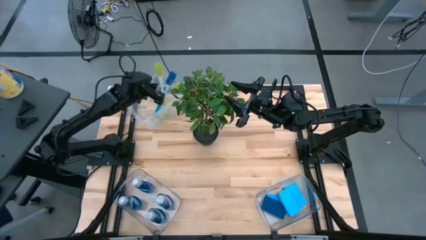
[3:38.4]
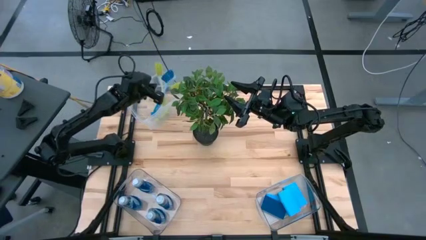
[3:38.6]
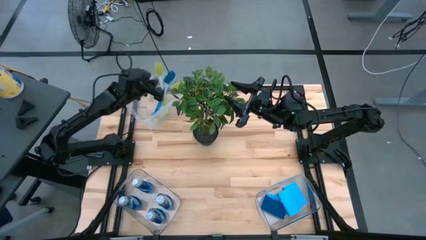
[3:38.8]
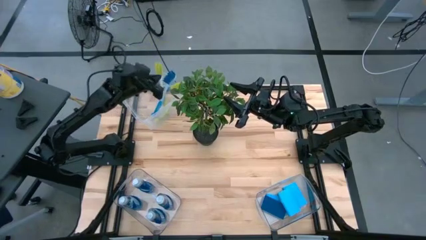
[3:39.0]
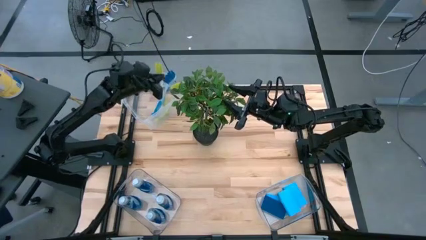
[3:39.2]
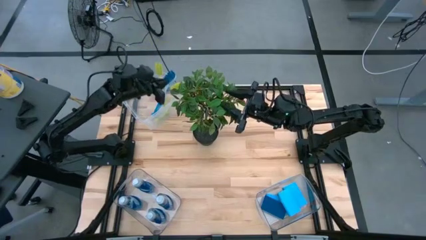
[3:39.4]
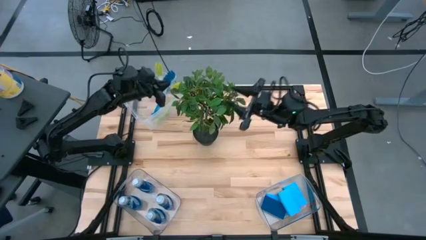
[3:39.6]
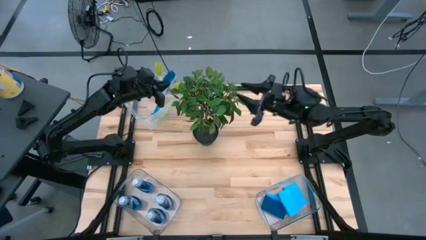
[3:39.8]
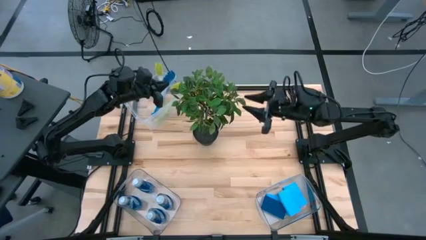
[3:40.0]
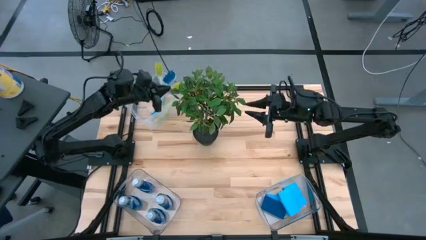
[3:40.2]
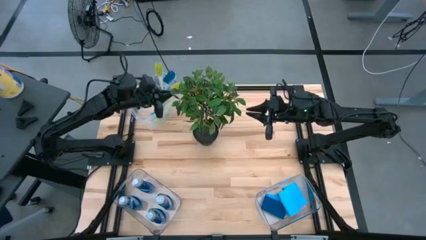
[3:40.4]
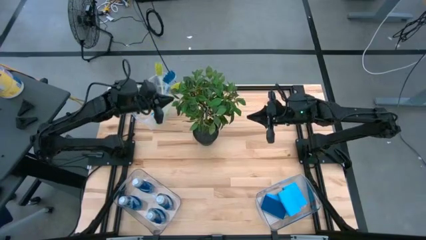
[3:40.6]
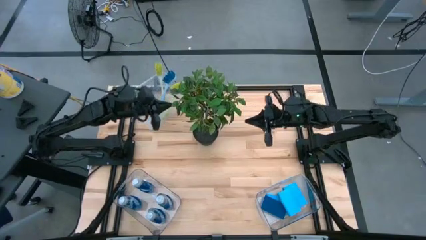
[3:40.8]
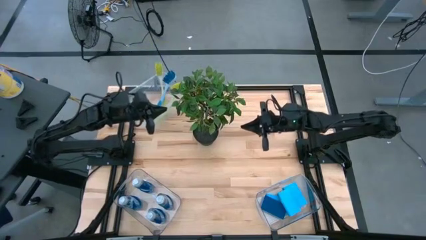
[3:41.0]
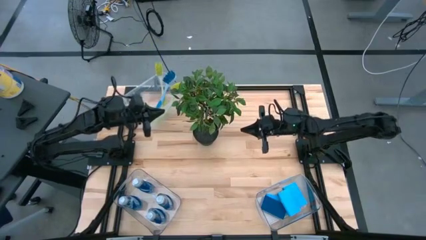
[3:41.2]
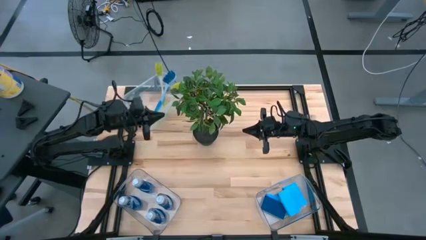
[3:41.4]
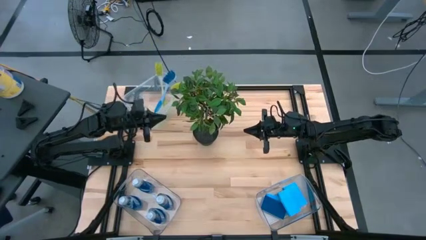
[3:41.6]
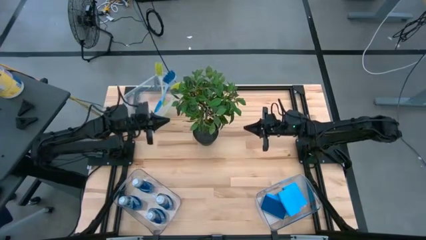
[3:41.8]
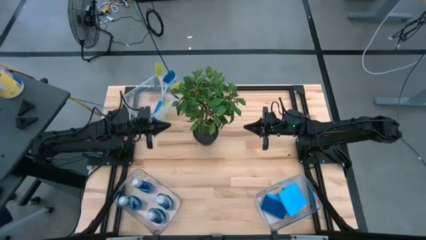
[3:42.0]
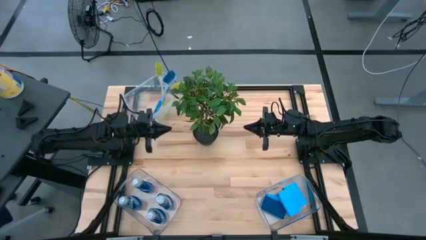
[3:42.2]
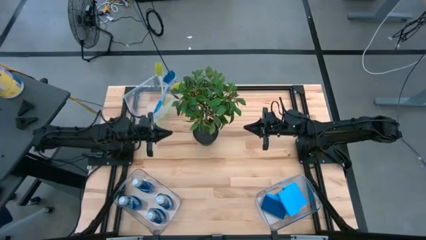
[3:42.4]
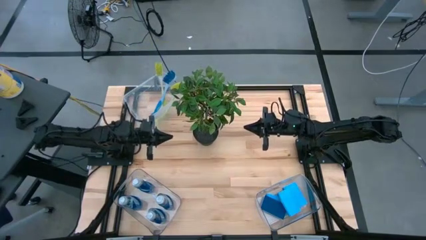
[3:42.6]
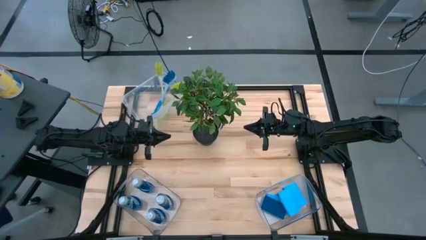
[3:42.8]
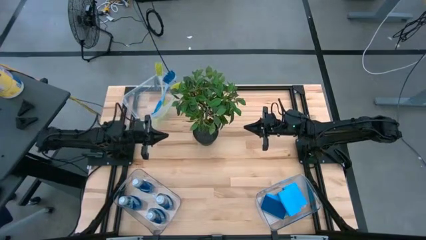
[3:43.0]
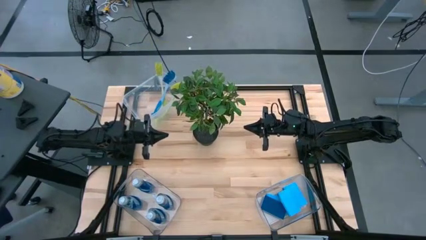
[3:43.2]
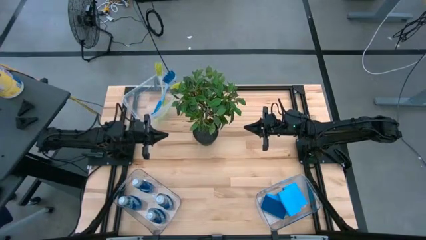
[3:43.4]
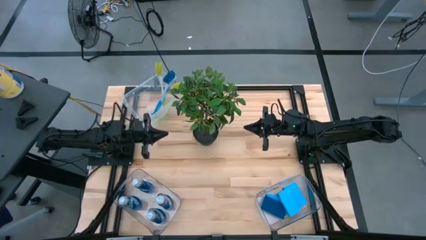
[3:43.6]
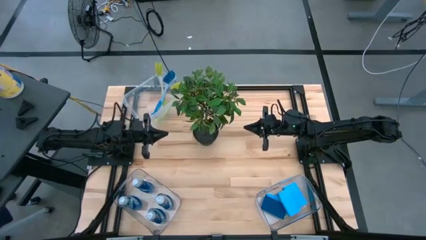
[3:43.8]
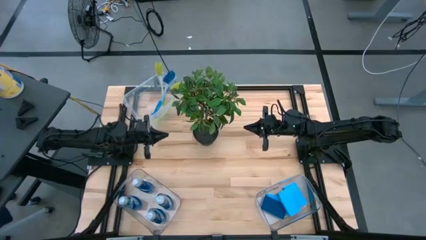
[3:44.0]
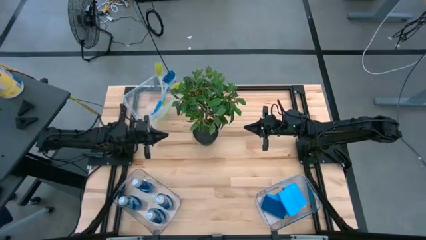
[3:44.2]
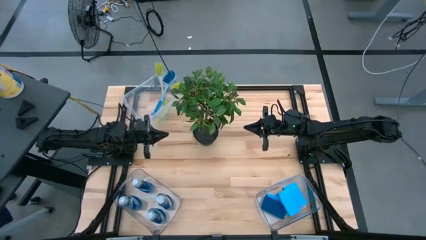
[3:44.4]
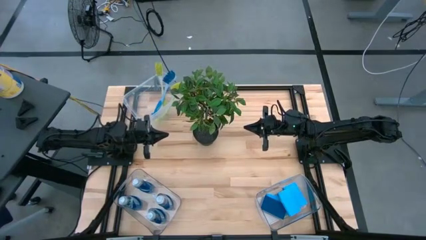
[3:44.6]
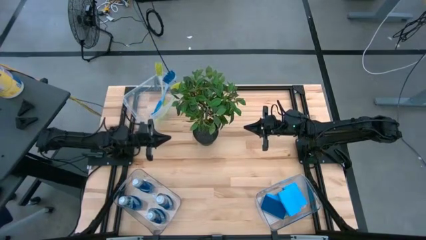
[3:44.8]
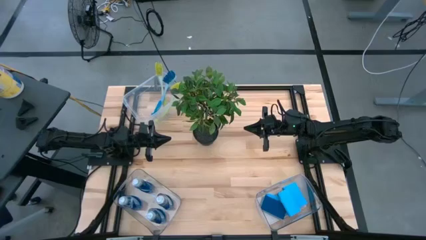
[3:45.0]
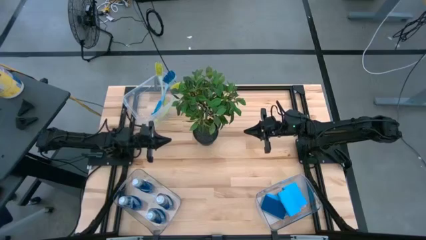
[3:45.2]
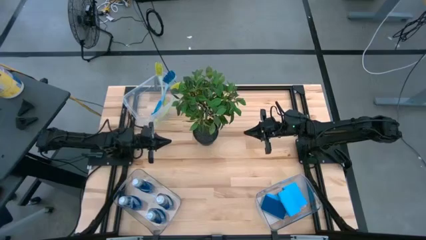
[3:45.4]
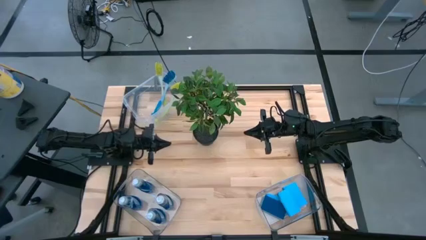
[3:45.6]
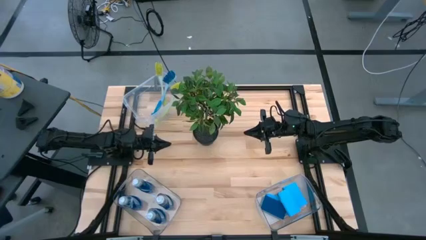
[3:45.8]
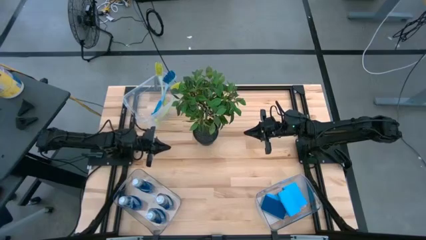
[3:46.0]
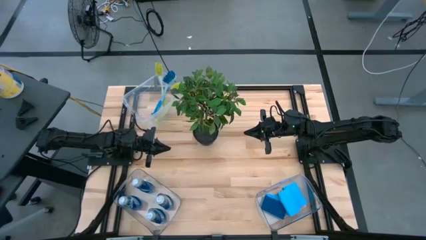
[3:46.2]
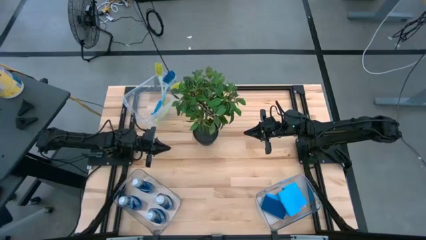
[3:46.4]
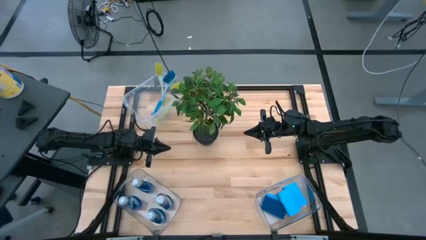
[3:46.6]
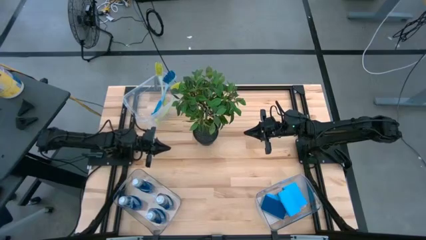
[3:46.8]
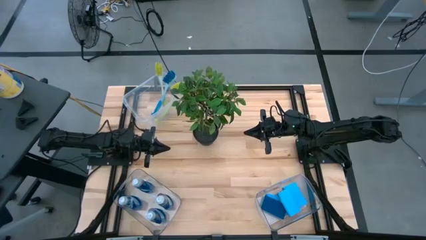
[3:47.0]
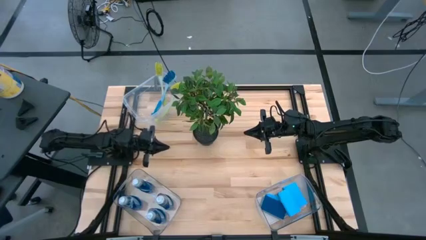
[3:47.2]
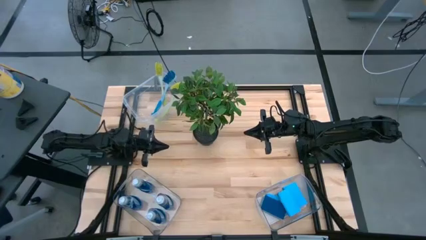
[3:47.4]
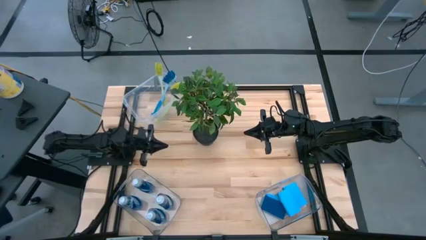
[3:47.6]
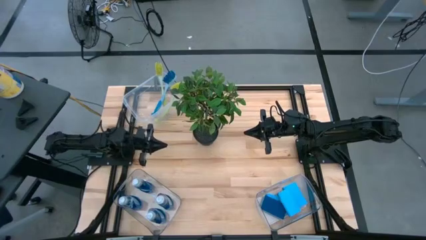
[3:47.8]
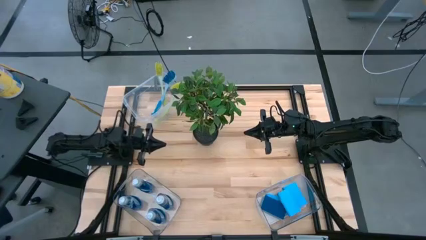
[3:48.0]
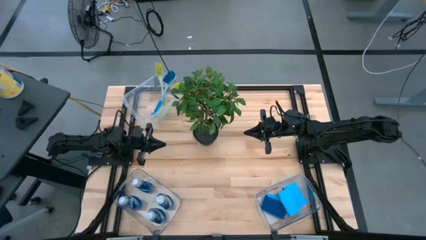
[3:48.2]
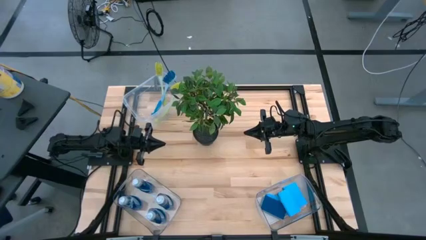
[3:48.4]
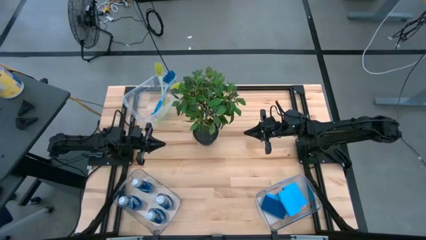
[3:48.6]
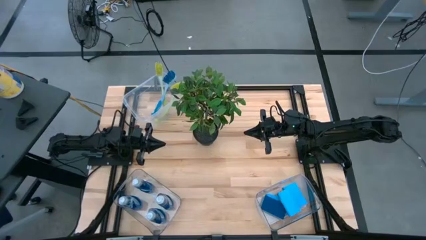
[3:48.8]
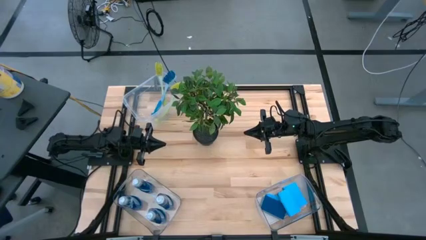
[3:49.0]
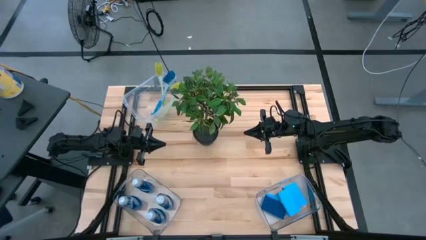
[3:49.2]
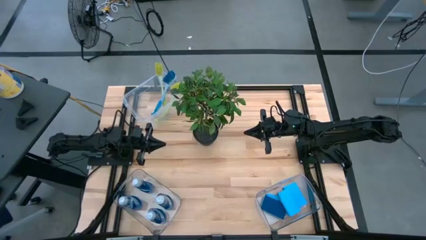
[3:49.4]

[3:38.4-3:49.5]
Task: Pick & Place Kitchen Sink Supplies
Return to Home Position

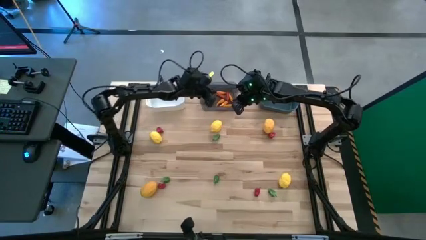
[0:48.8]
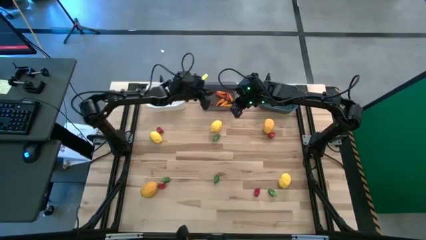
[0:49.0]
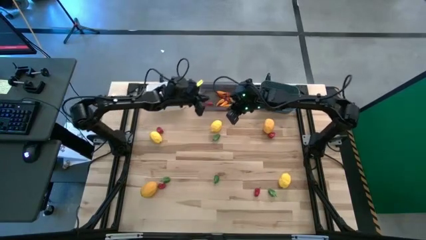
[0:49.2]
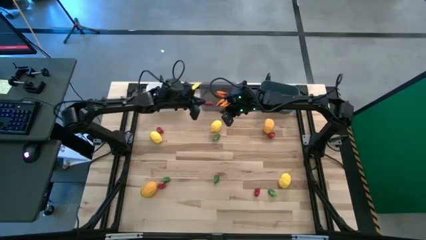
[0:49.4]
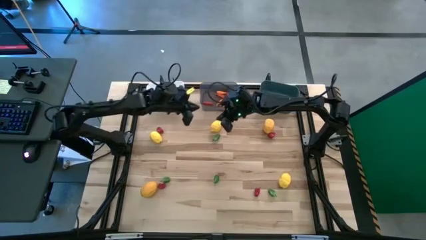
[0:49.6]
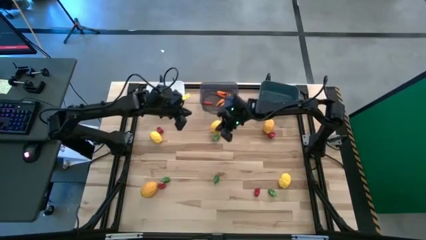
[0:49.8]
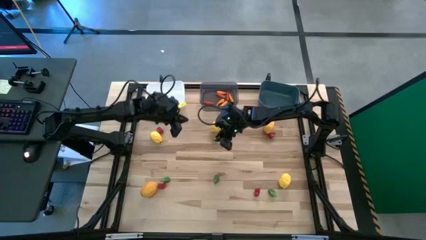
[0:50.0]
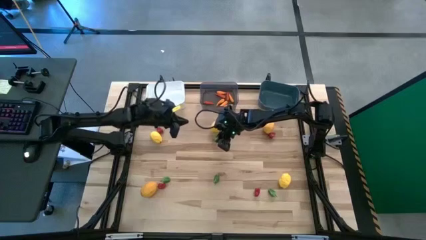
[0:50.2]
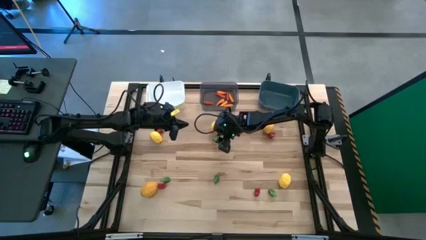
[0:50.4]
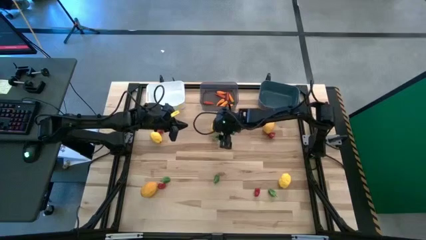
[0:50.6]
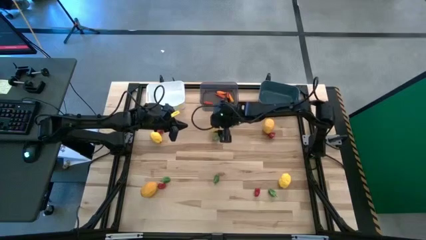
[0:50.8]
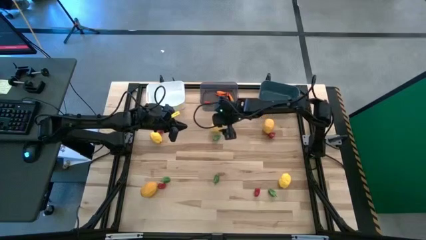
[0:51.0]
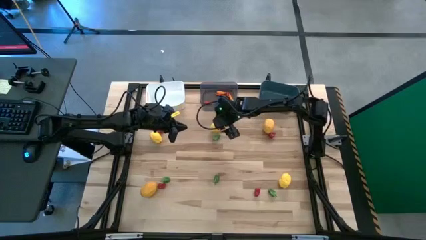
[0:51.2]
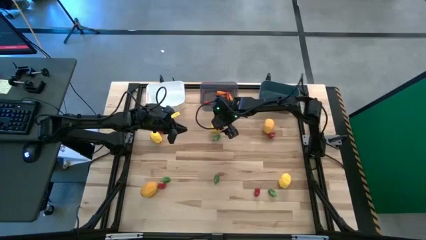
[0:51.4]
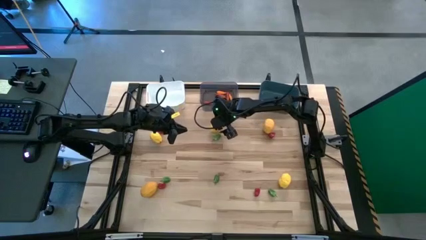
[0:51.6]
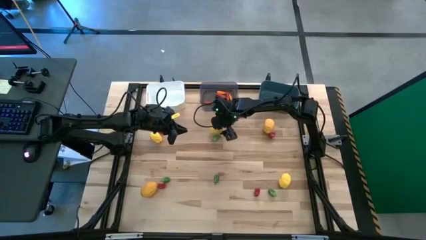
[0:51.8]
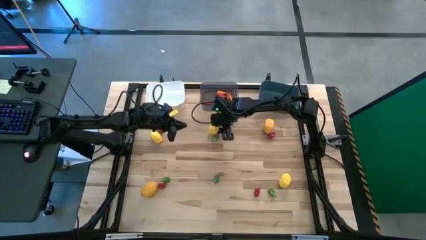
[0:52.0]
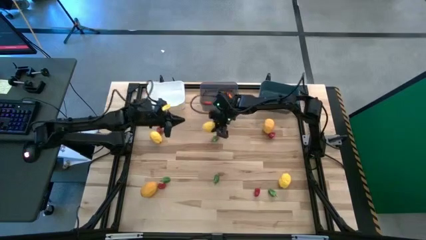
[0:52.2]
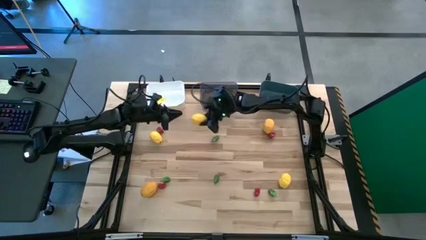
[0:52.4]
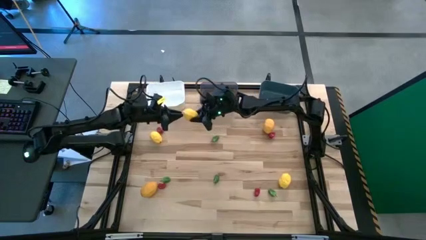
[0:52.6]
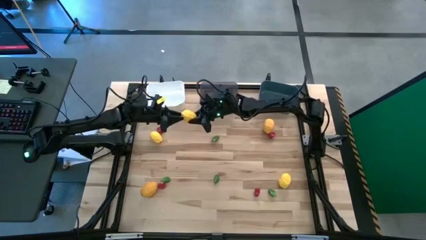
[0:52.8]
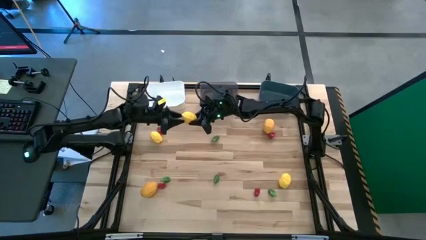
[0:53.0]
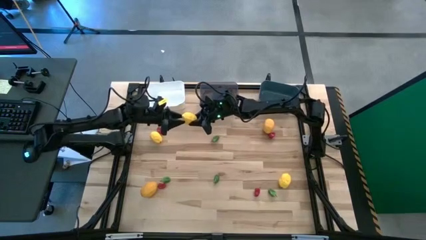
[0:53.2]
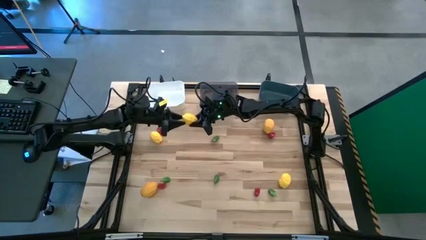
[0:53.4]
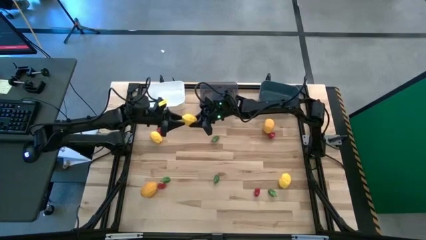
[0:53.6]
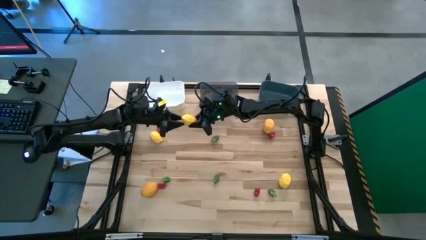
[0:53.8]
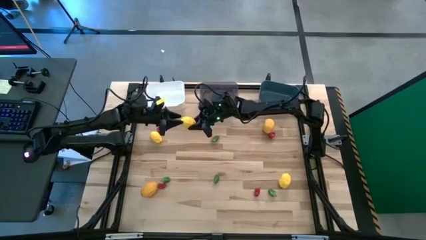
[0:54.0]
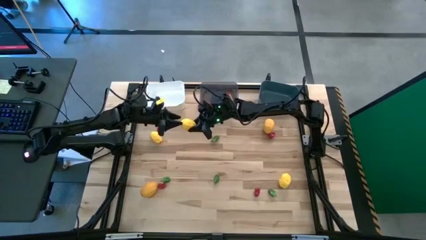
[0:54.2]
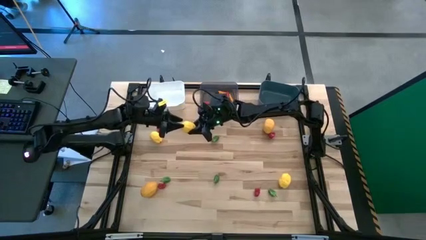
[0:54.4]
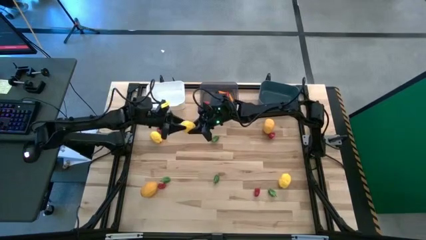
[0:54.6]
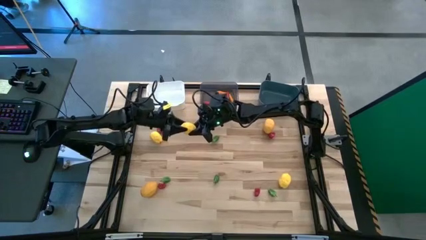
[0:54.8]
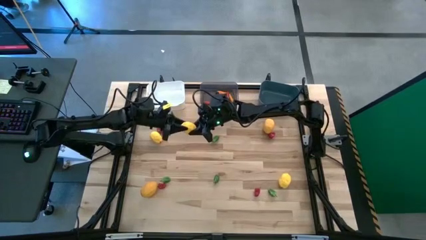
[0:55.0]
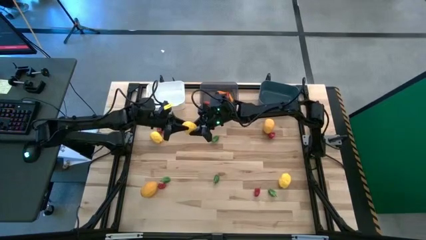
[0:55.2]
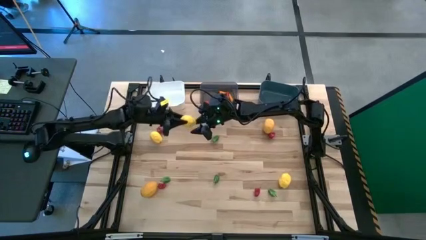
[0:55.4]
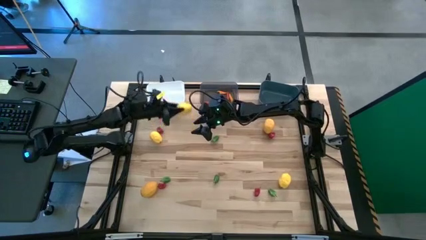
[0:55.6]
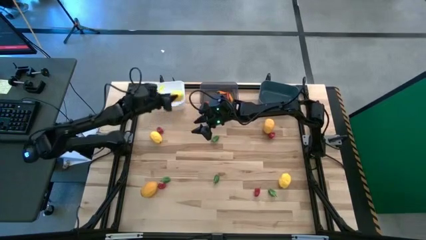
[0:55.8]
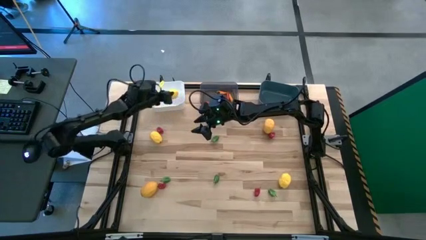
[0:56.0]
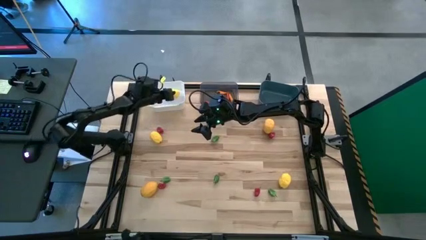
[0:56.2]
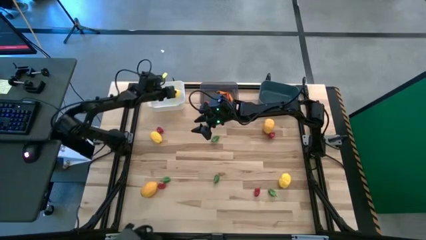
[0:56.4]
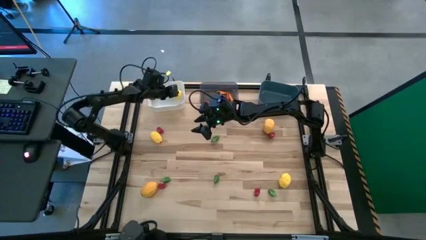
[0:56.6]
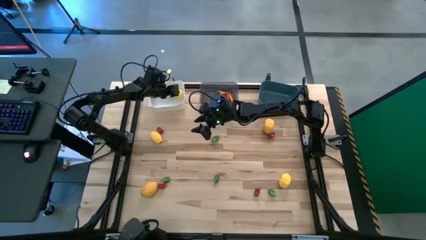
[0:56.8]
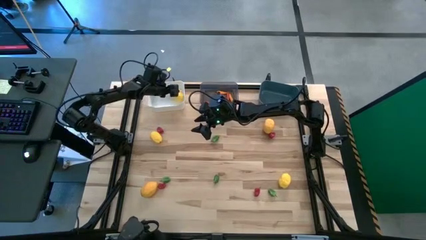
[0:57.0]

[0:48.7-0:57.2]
Task: Sort produce into baskets
Put the top middle yellow lemon into the white bin
